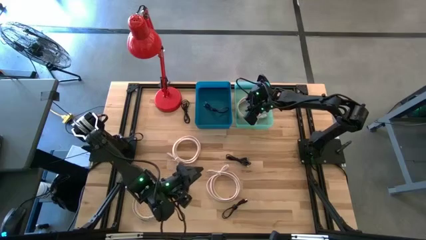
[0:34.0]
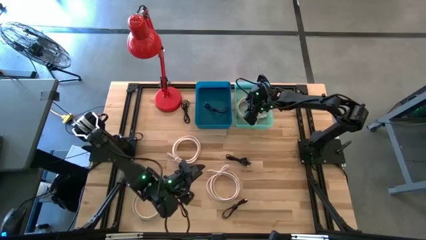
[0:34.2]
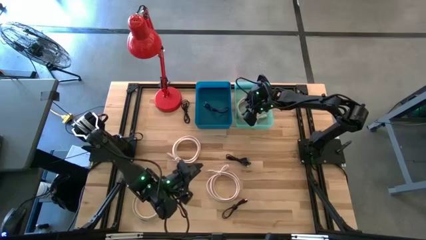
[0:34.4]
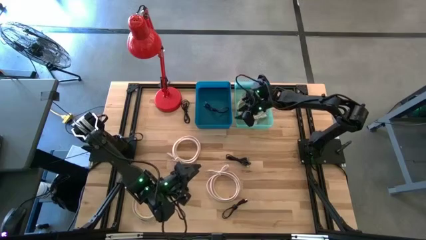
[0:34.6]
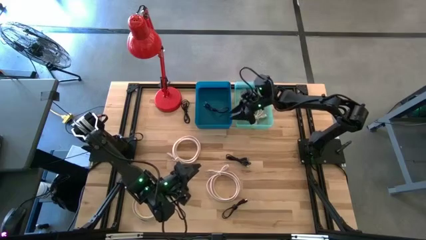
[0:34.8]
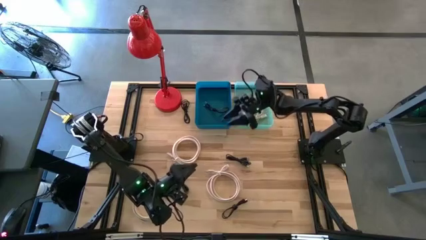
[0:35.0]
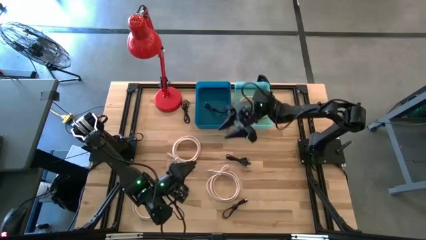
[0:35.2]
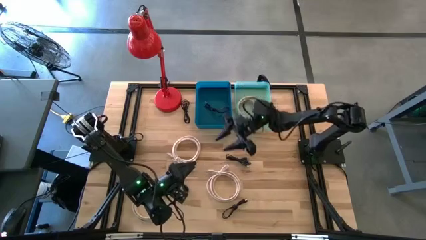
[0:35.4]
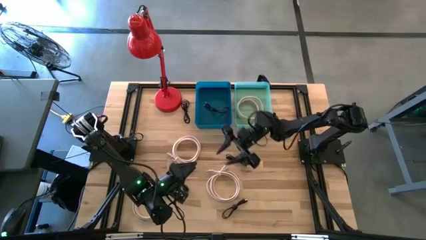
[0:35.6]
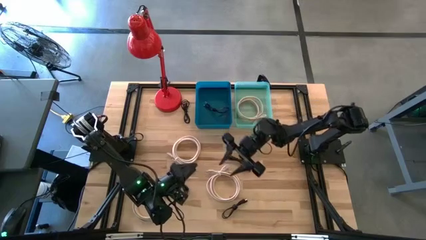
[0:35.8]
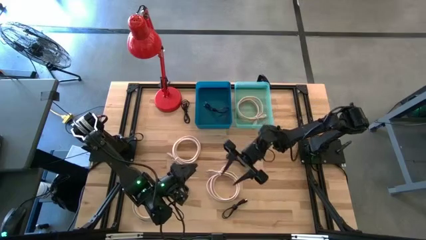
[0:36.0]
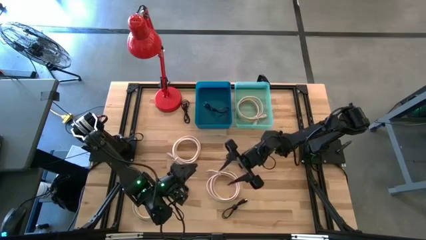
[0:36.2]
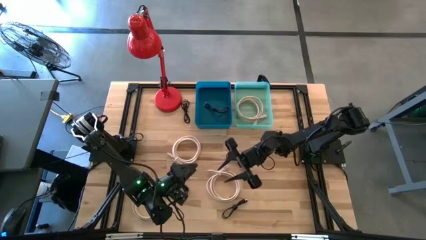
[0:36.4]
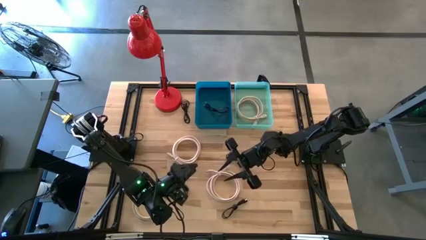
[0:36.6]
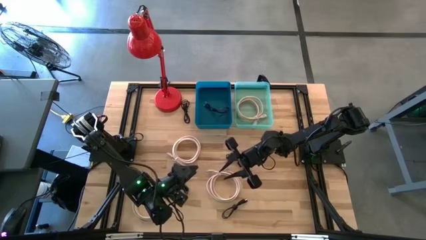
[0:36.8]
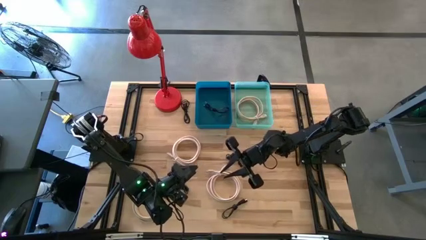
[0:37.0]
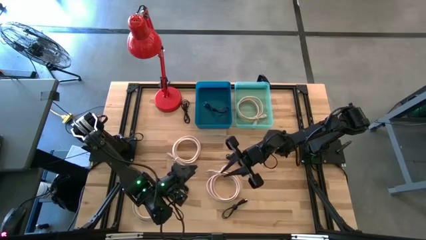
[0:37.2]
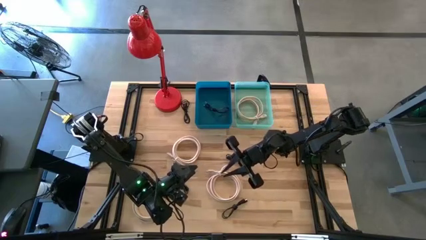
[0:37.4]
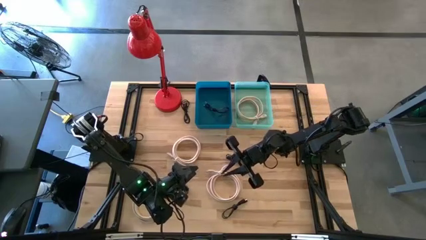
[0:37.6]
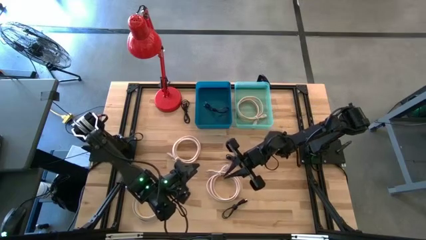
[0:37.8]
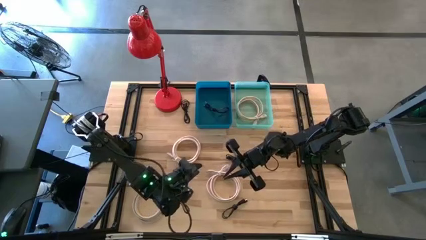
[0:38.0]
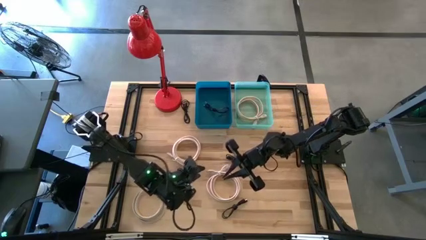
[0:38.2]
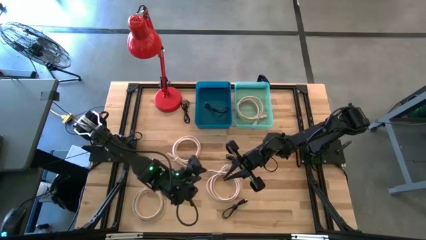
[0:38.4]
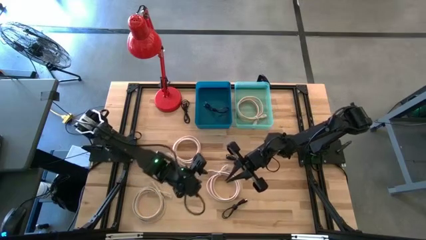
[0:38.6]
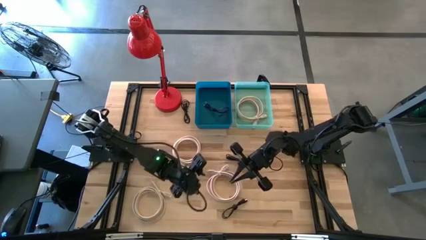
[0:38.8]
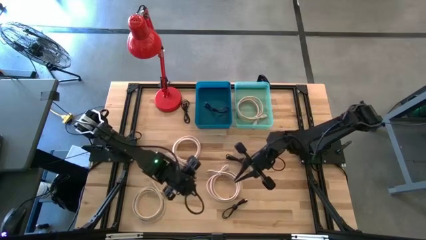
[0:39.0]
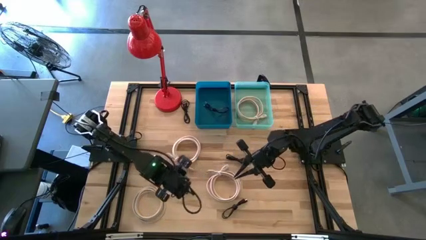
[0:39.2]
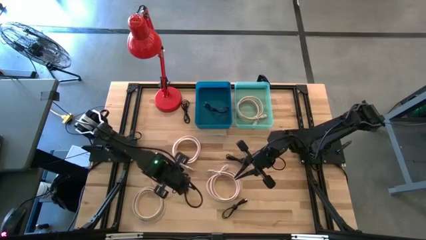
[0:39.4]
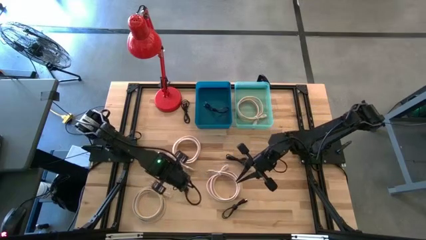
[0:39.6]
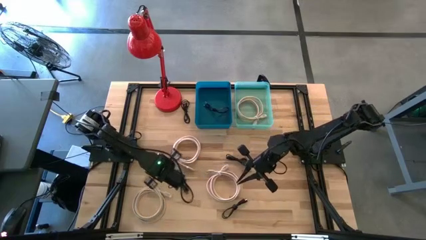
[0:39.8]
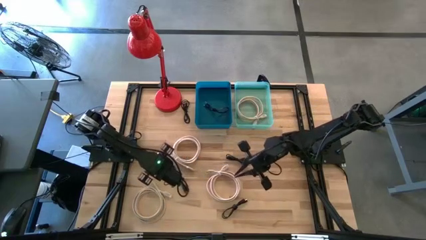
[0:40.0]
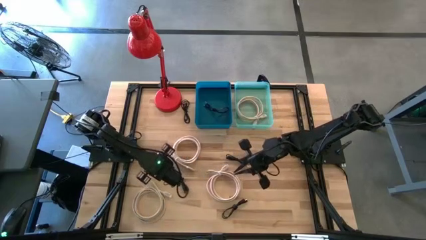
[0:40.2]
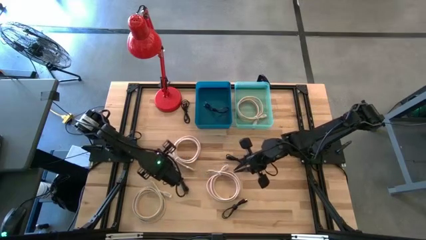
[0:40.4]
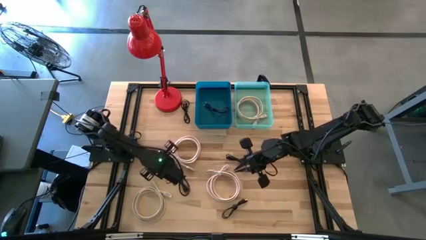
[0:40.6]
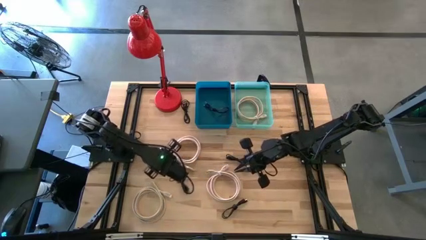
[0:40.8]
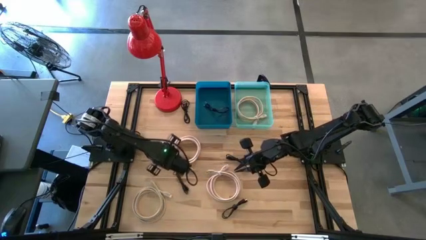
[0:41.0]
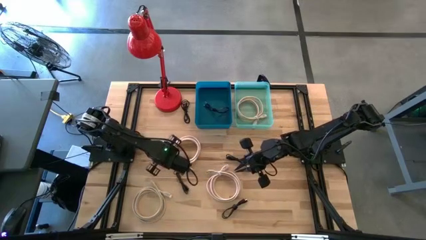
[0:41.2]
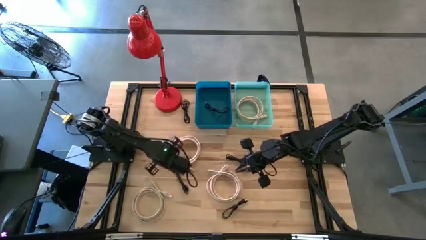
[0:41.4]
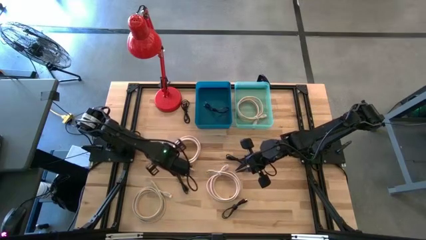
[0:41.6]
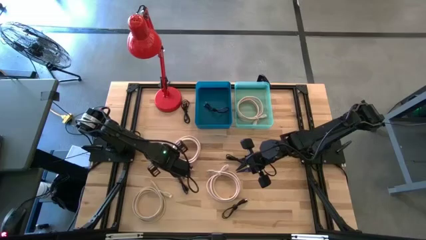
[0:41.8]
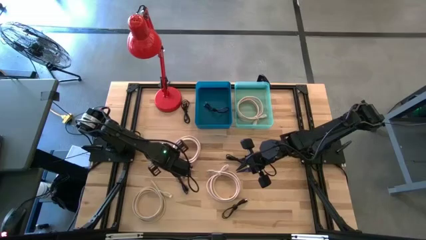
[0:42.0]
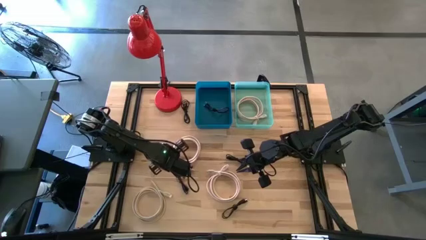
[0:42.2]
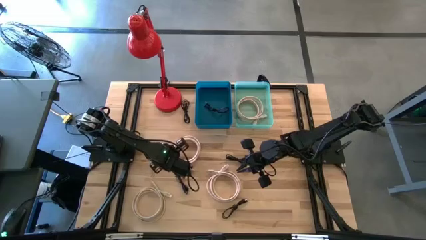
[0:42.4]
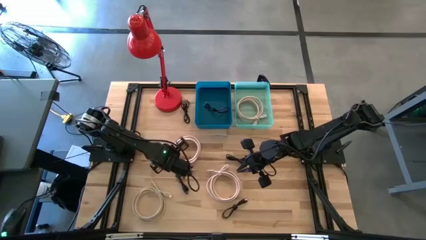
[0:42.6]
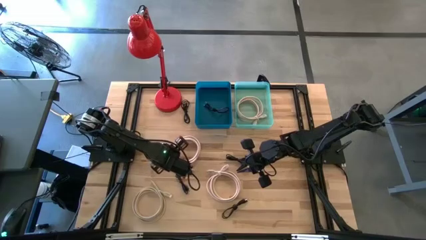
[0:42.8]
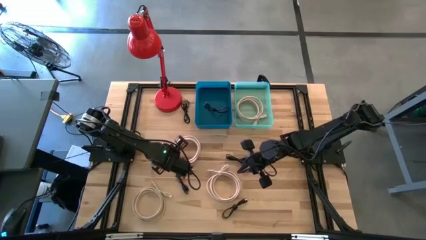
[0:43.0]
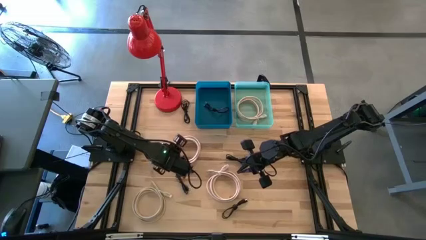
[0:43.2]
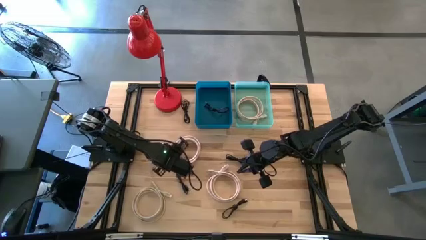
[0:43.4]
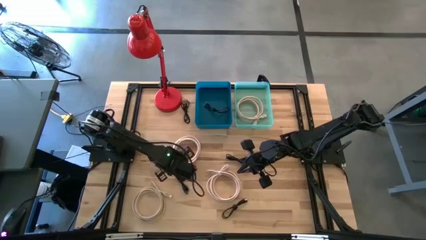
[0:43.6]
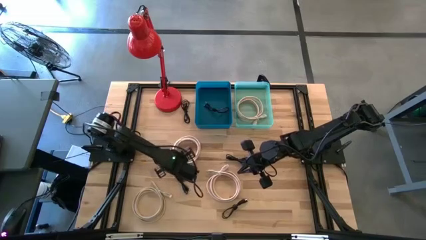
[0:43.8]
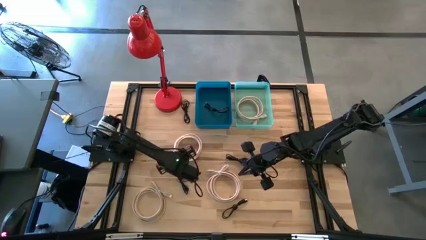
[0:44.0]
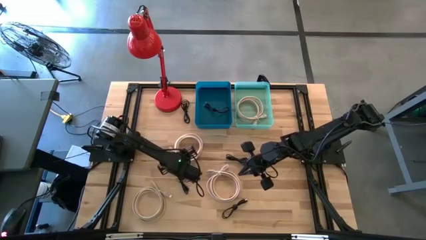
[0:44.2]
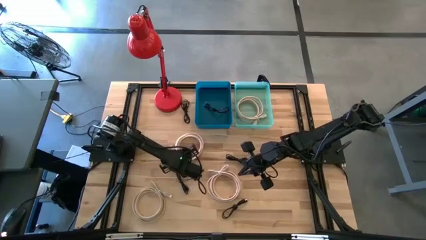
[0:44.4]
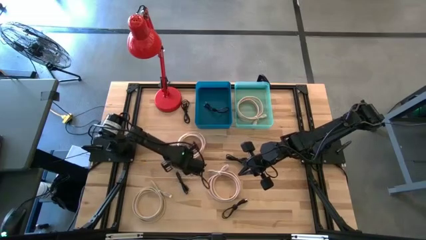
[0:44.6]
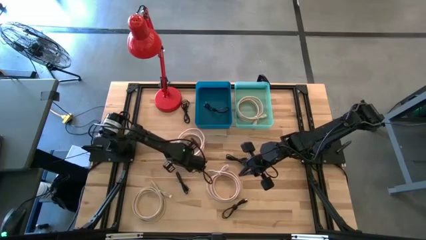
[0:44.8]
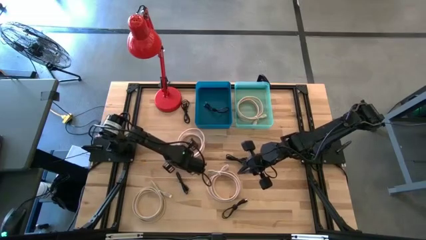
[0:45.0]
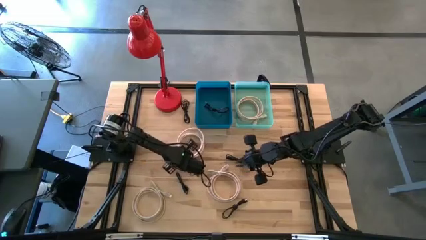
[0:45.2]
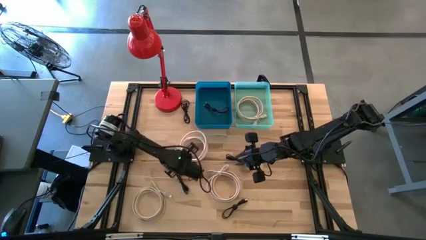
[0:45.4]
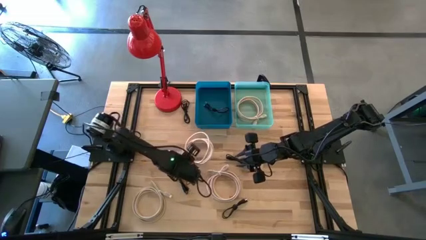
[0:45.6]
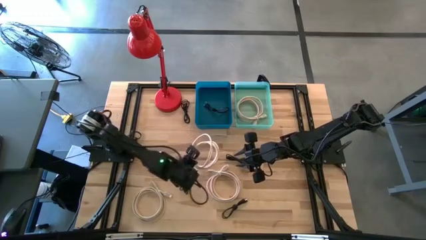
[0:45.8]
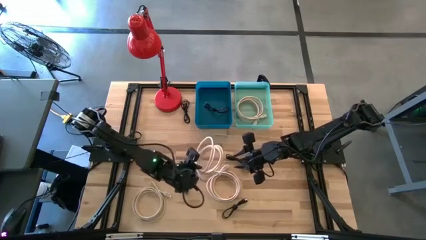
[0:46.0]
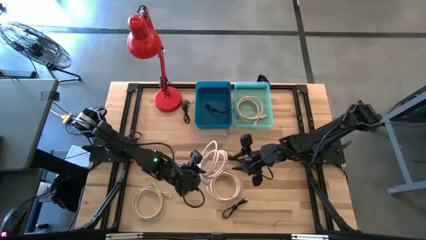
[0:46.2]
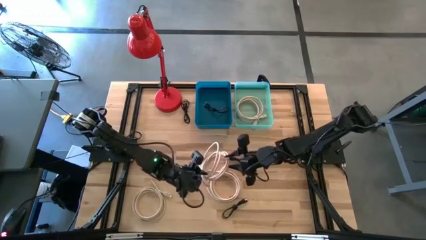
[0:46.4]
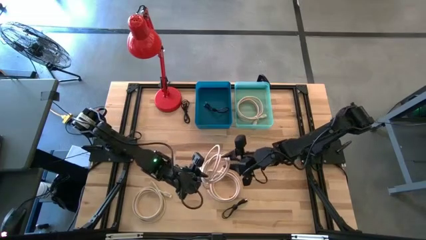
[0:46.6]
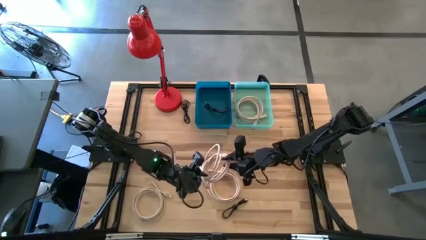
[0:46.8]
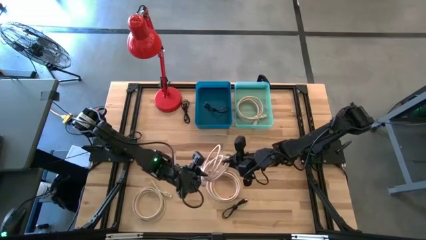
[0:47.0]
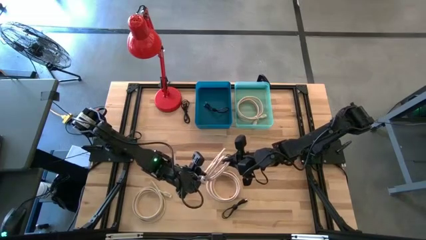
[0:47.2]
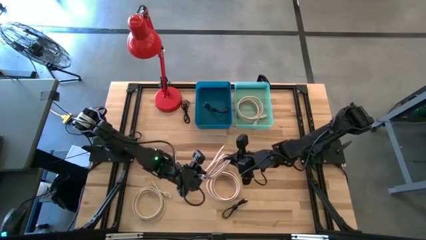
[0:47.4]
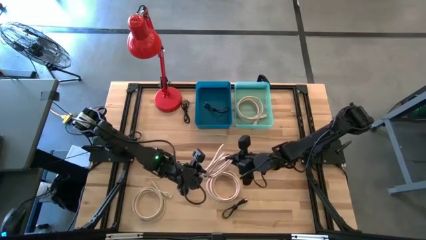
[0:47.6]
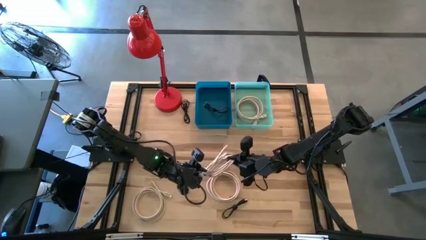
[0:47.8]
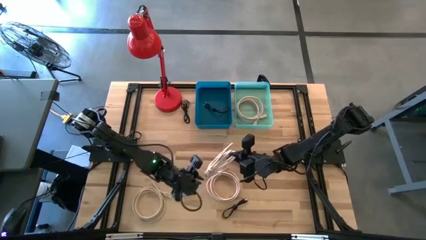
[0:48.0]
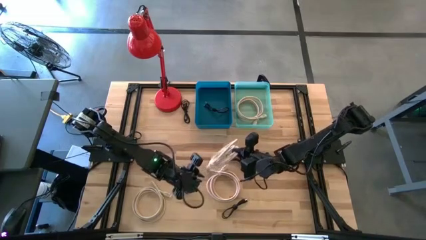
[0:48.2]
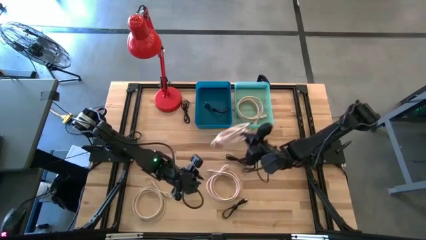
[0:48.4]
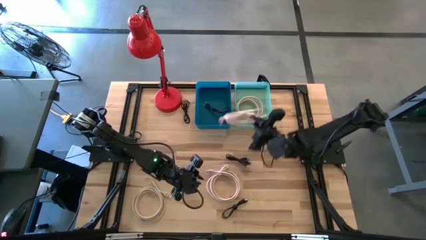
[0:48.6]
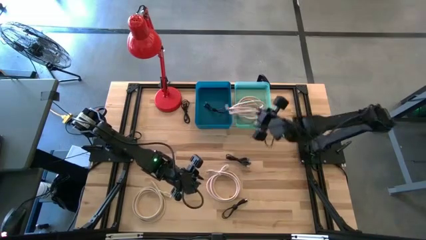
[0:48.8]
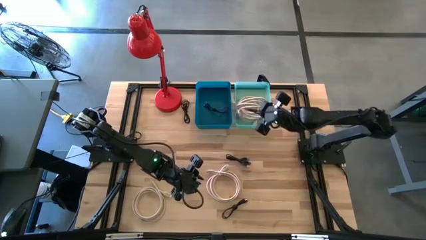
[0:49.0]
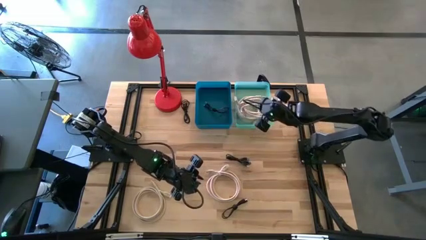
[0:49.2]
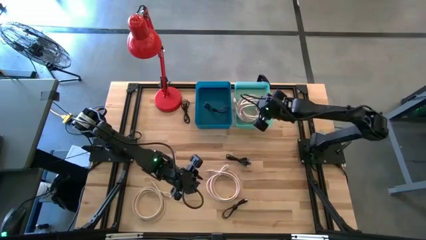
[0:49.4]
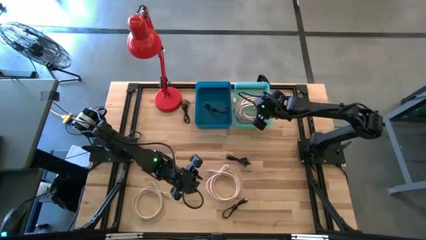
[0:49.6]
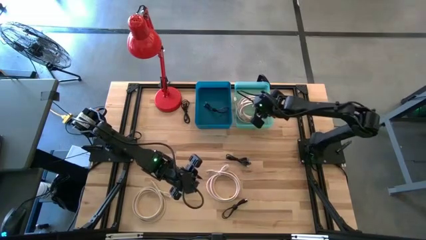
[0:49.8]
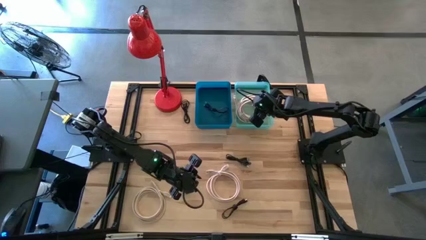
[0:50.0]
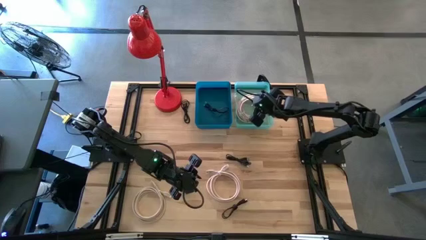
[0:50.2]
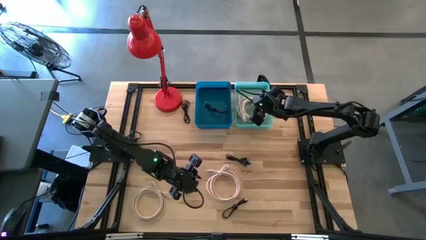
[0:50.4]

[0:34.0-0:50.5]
Task: Pick & Place USB Port
Put the brown HDMI cable into the green bin
